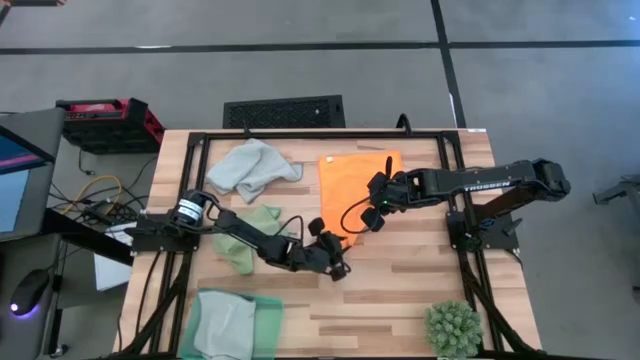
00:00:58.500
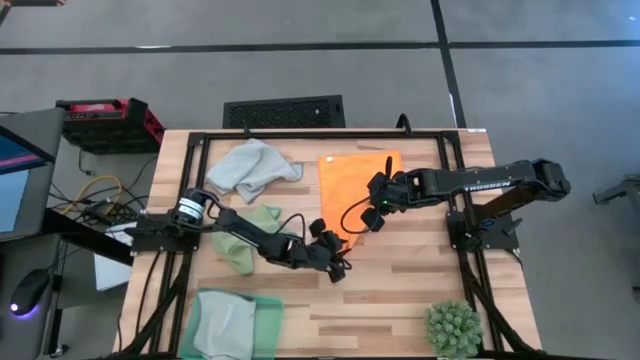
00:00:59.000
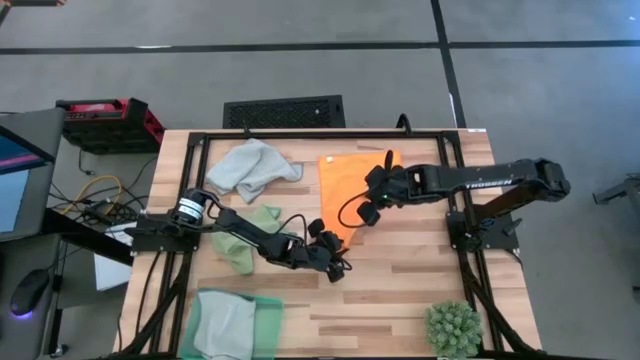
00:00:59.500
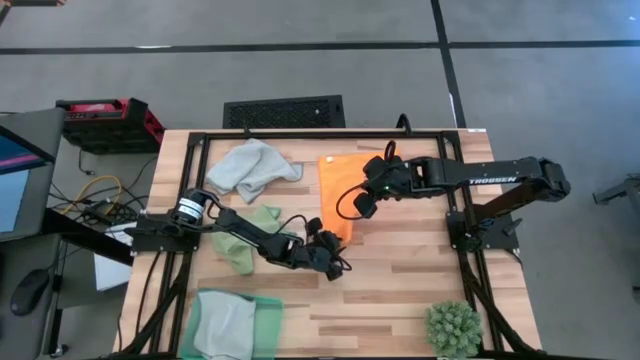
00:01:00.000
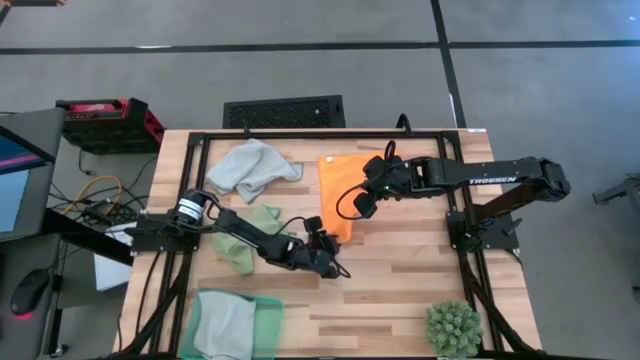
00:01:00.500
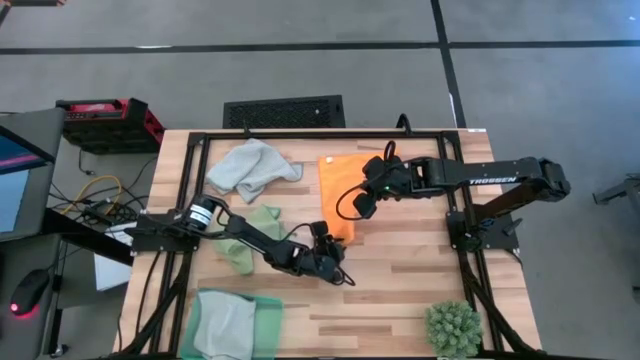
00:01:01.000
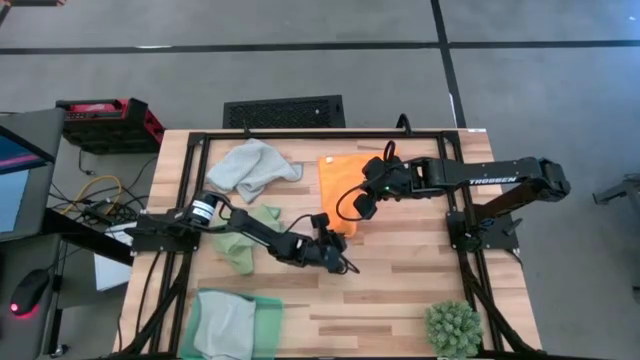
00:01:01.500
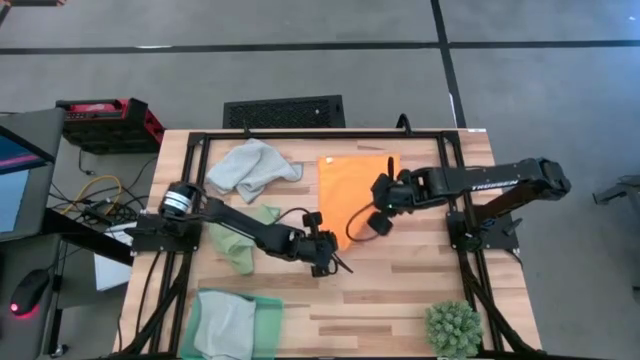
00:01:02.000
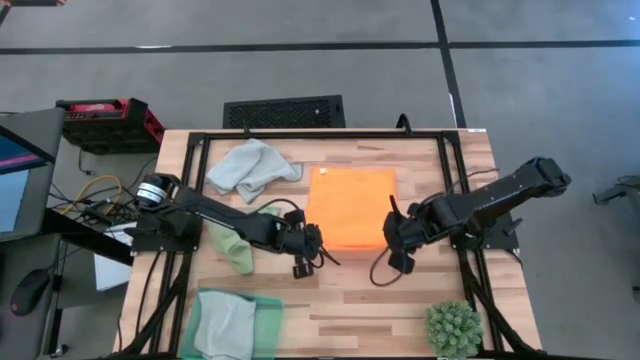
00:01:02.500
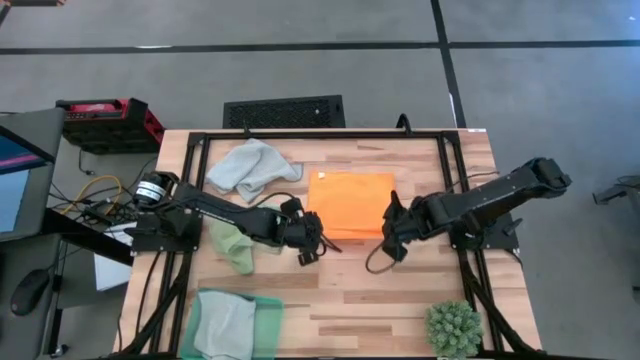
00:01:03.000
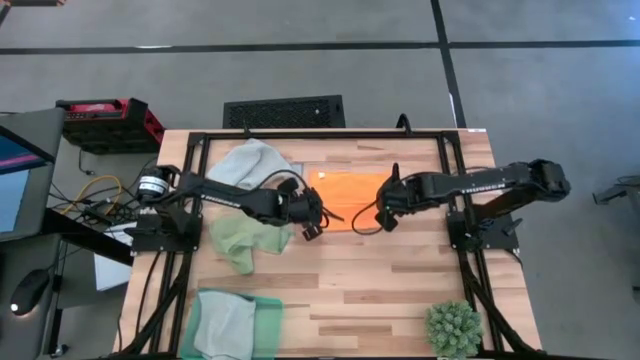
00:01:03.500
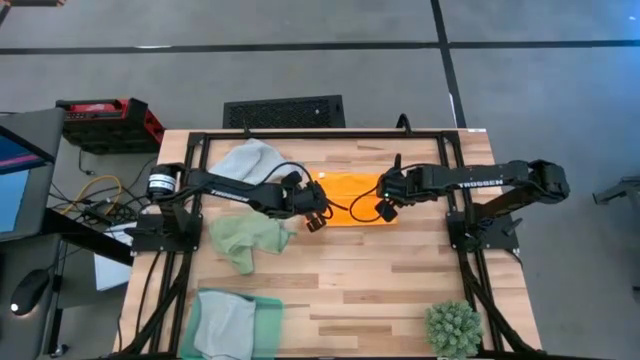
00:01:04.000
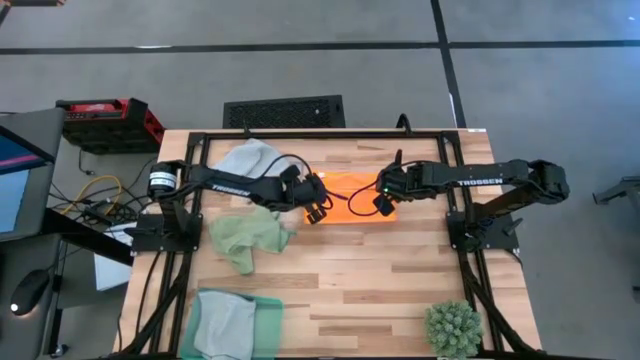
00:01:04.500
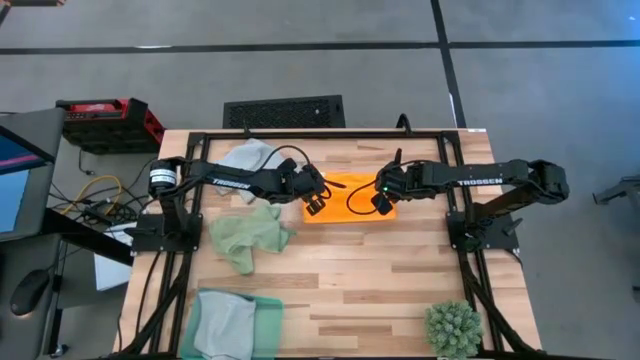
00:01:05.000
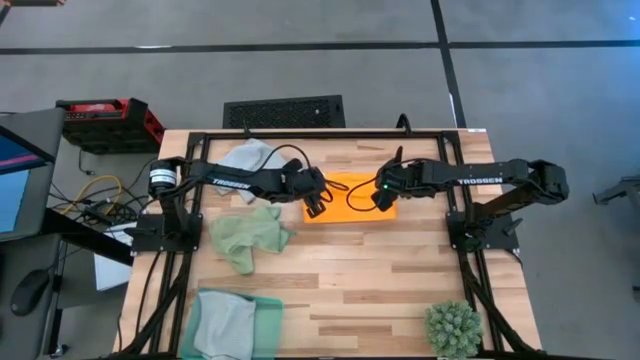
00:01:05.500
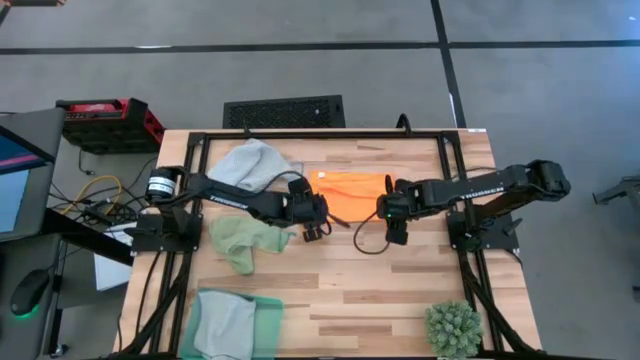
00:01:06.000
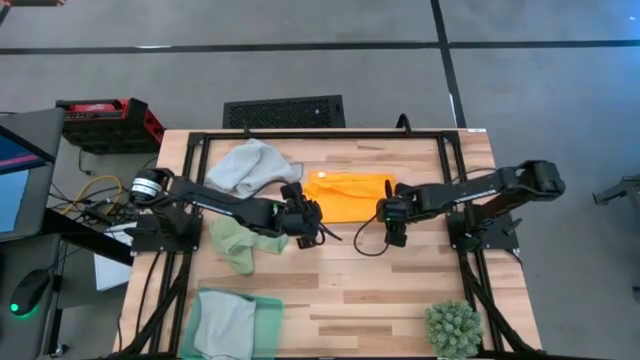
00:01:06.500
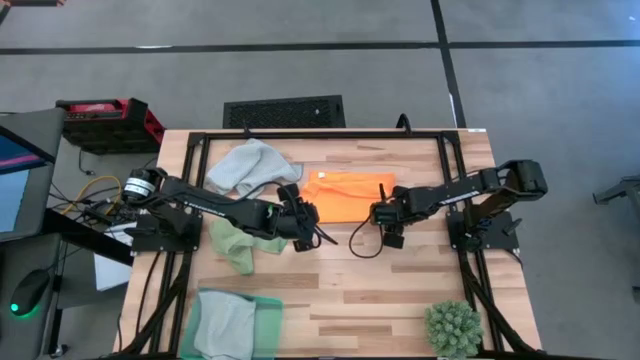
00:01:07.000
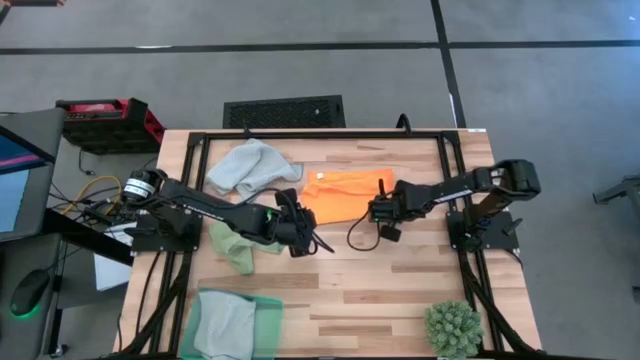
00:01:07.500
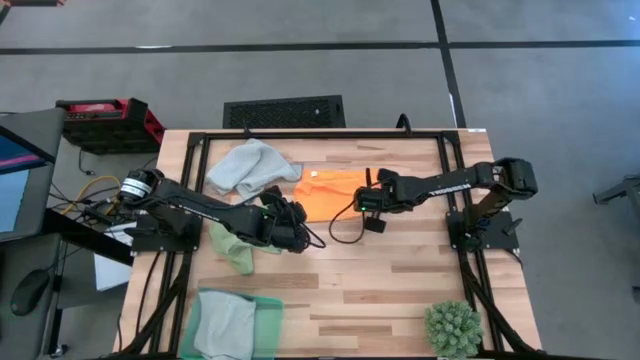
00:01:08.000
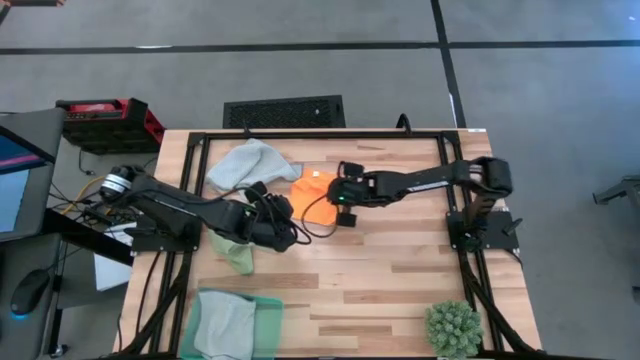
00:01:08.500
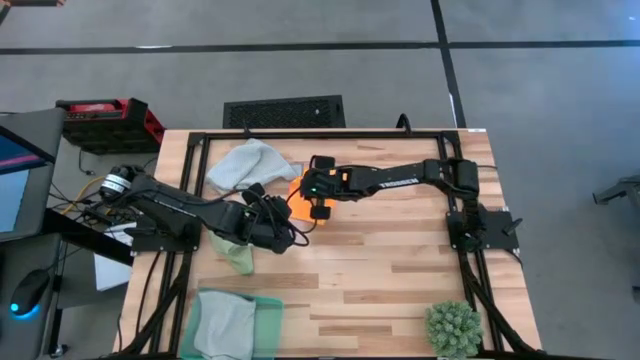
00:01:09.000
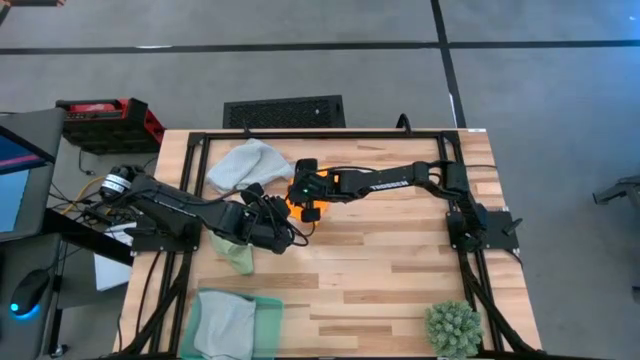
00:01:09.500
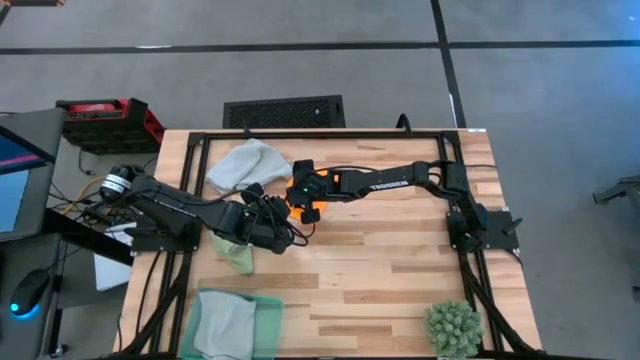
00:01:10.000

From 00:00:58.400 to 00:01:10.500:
Task: Fold microfiber towels
Fold the yellow microfiber cloth

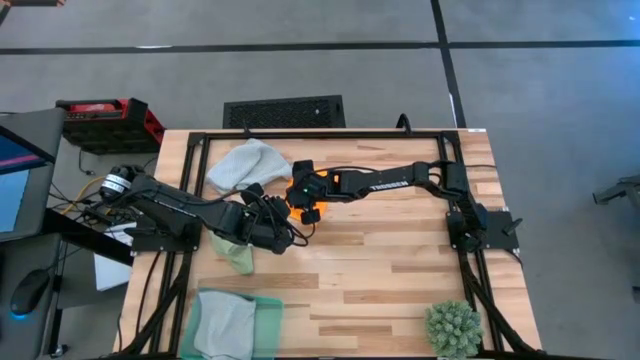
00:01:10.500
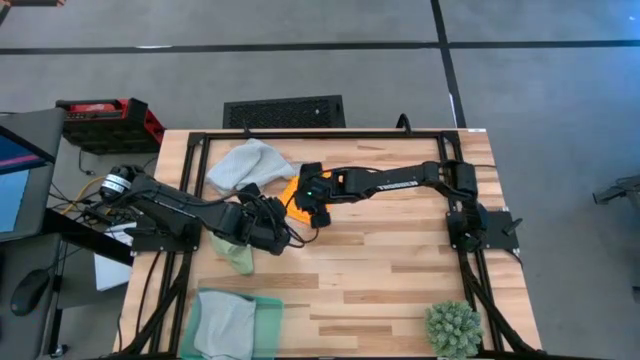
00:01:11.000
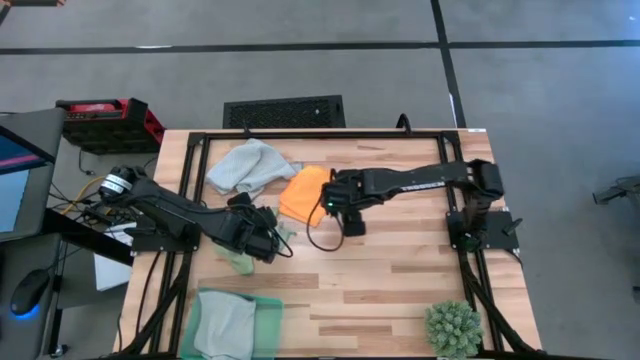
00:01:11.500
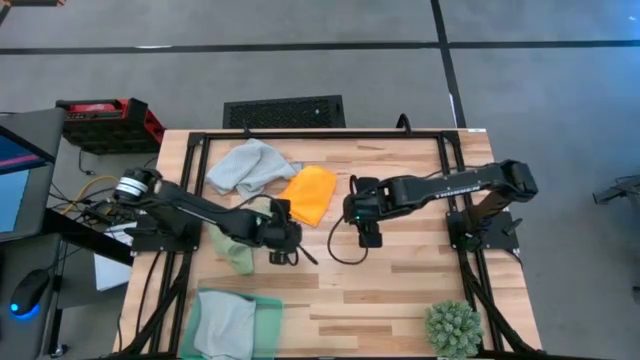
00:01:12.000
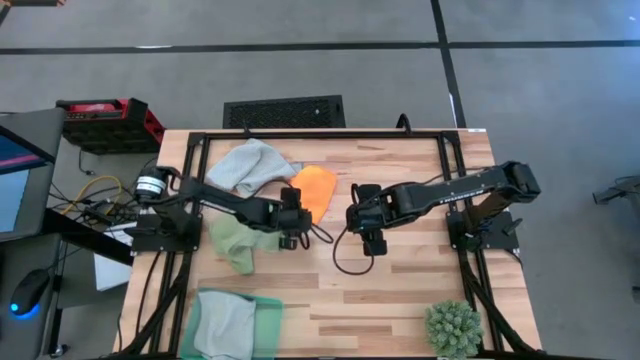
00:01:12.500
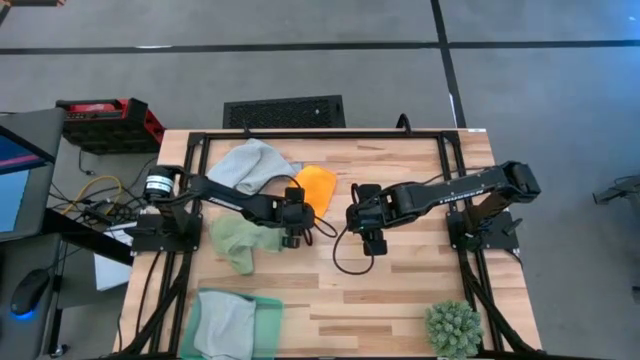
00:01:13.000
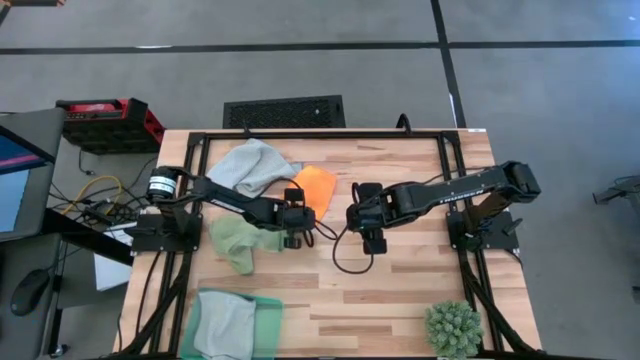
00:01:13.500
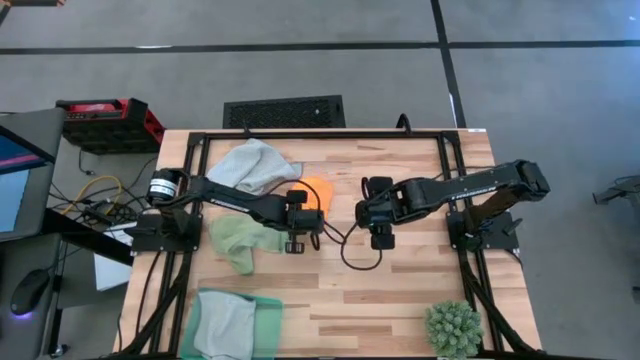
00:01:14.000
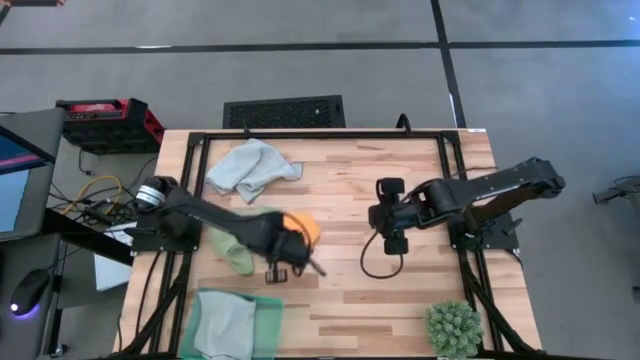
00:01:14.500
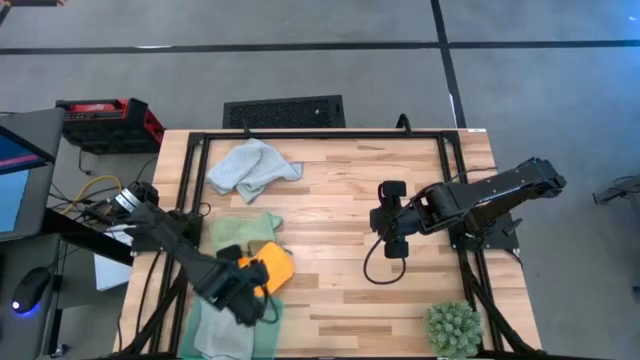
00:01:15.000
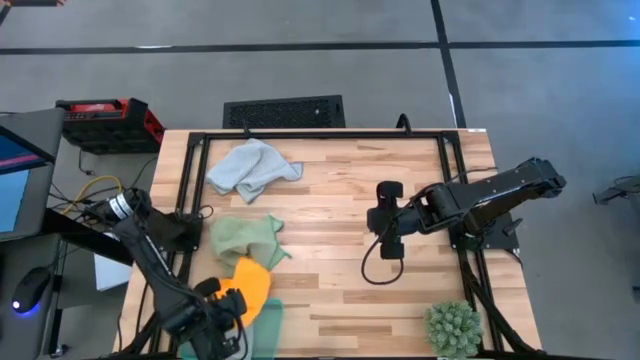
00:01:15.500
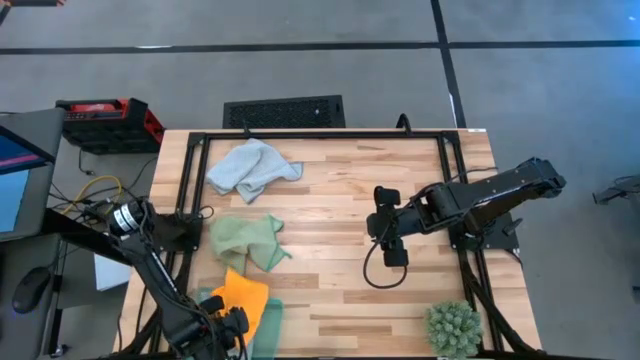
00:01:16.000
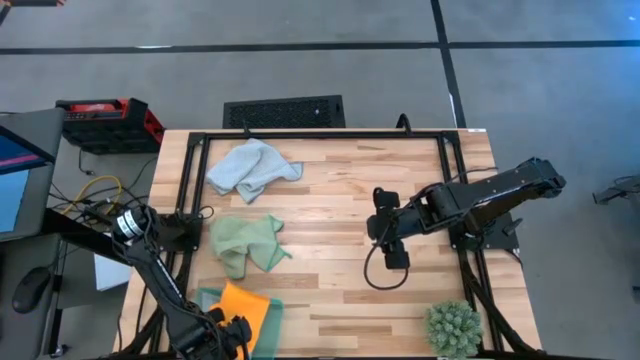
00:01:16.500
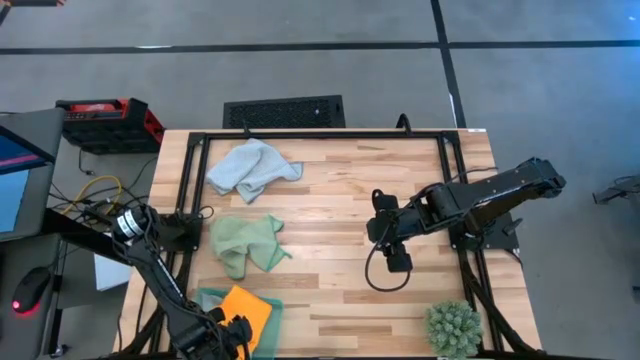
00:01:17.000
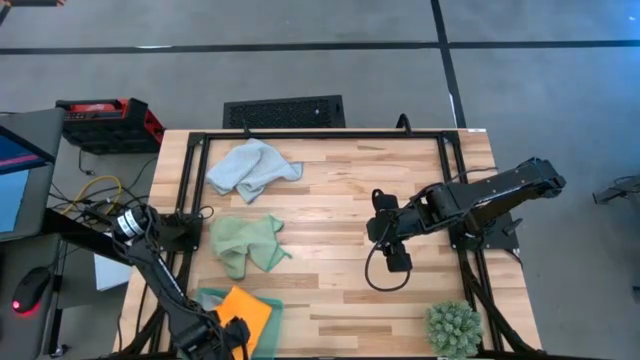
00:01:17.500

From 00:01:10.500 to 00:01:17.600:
Put the yellow microfiber cloth into the green bin

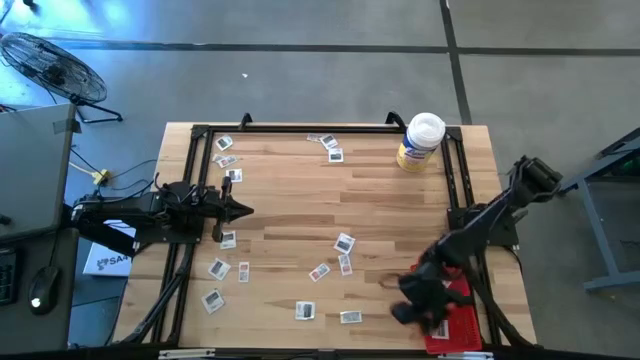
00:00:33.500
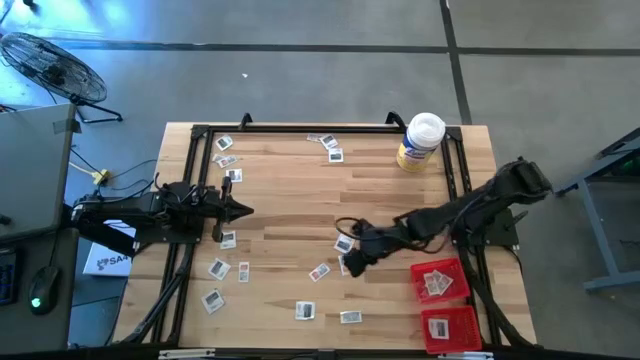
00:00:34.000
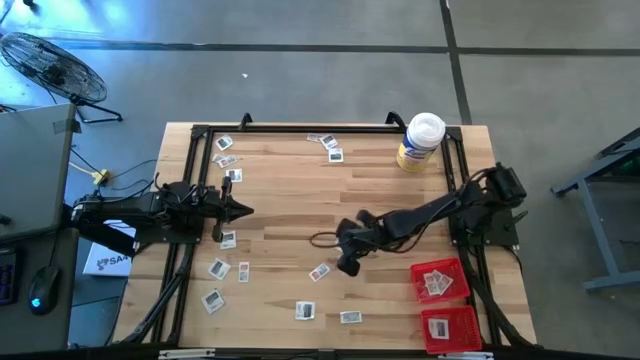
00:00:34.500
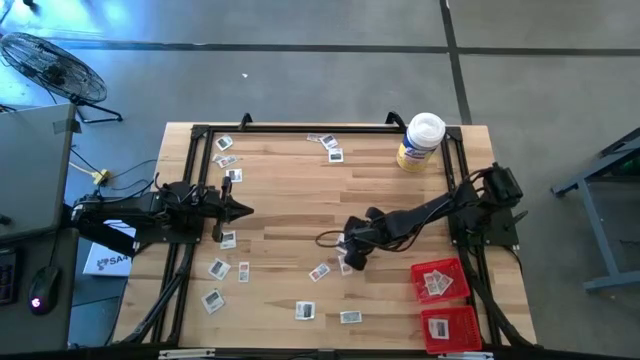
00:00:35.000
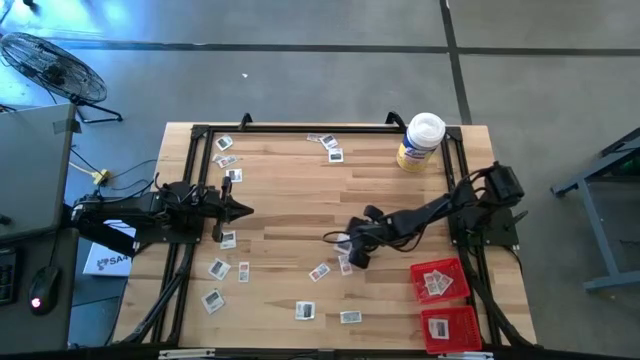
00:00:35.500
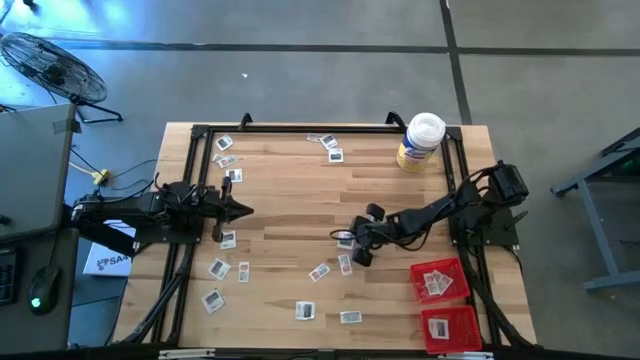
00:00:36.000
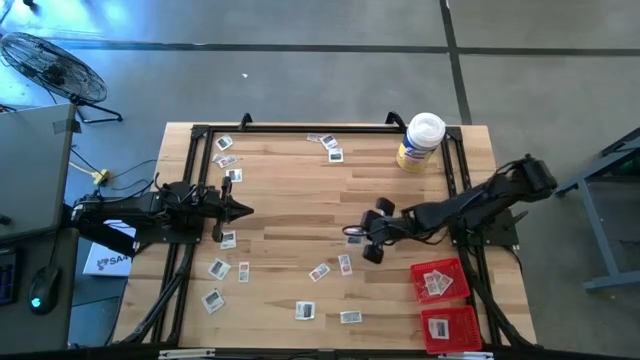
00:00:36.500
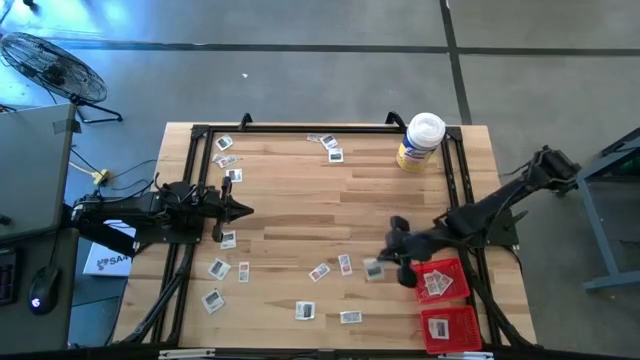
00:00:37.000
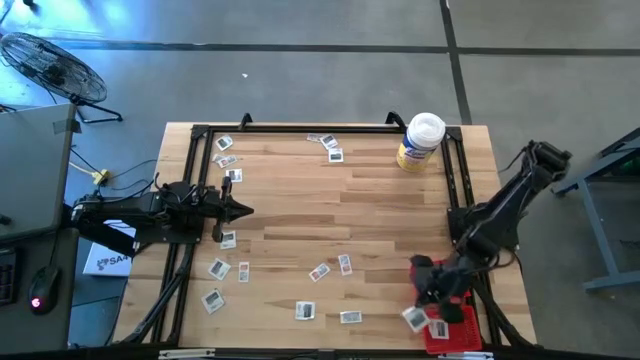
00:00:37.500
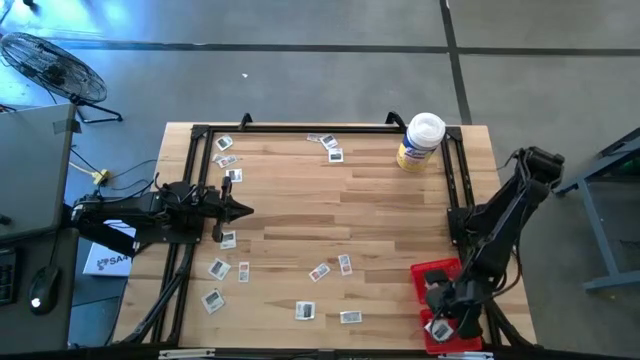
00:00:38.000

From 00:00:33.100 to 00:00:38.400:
Task: Pick & Place First Aid Supplies
Put the white towelette pack into the bottom red bin
